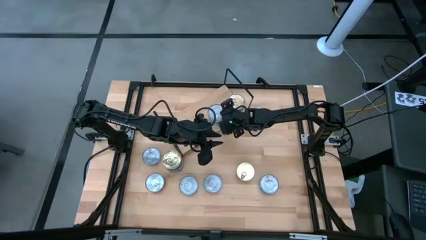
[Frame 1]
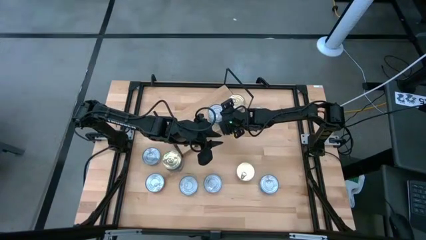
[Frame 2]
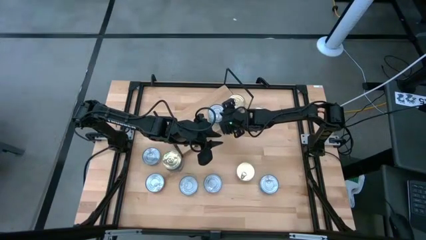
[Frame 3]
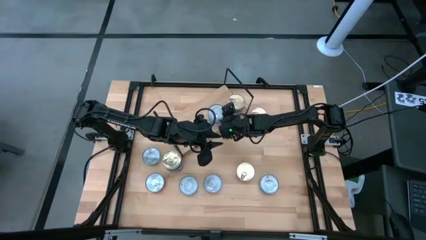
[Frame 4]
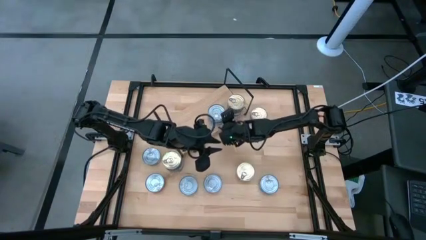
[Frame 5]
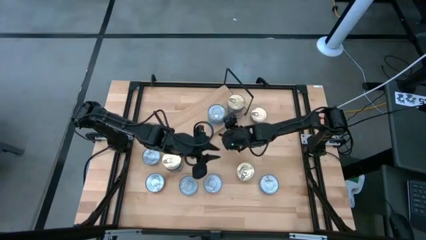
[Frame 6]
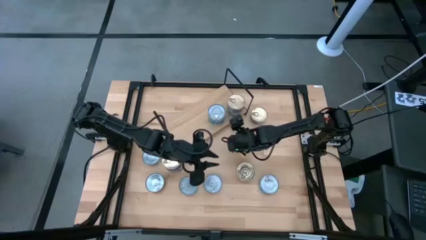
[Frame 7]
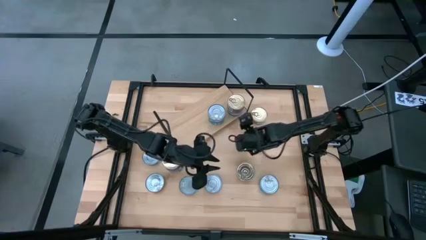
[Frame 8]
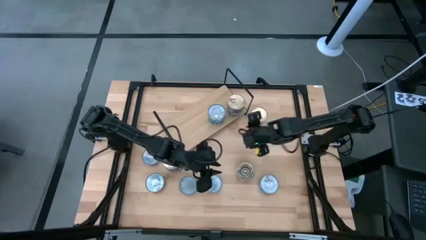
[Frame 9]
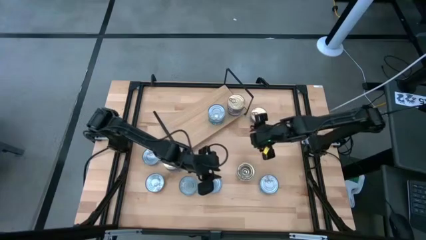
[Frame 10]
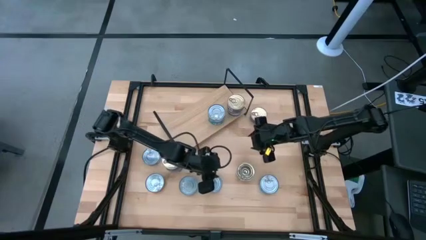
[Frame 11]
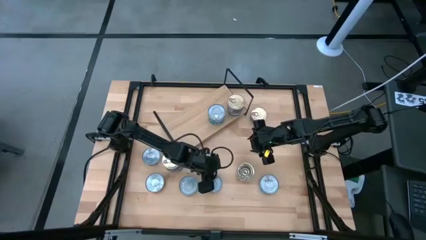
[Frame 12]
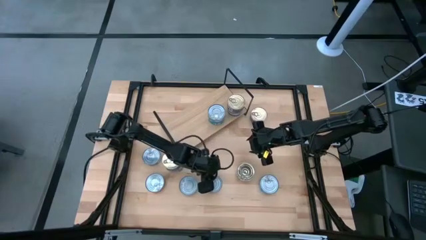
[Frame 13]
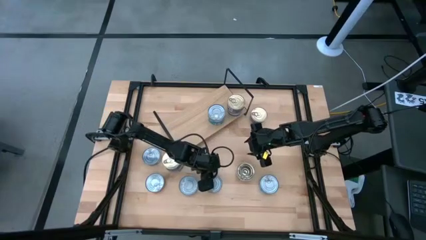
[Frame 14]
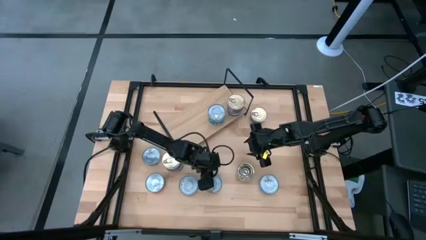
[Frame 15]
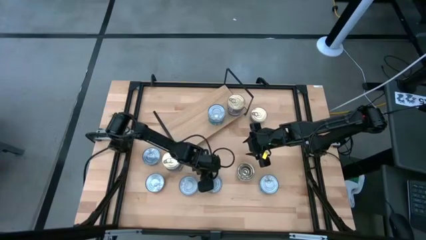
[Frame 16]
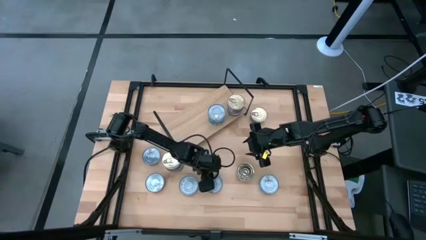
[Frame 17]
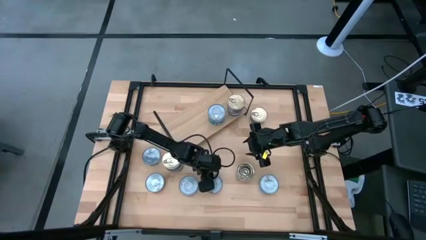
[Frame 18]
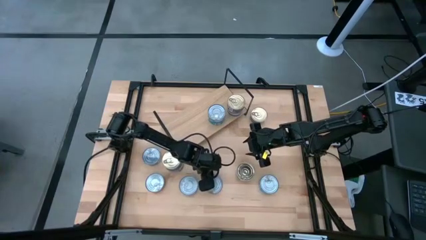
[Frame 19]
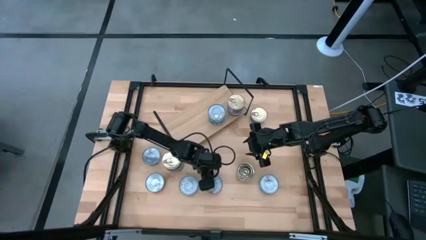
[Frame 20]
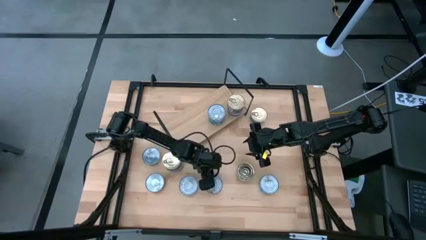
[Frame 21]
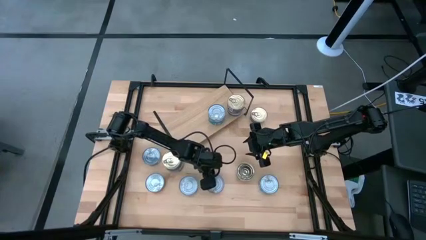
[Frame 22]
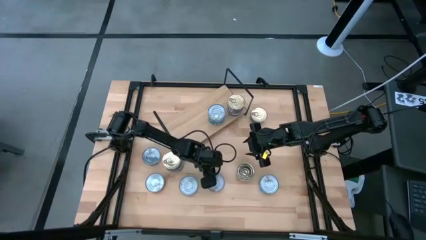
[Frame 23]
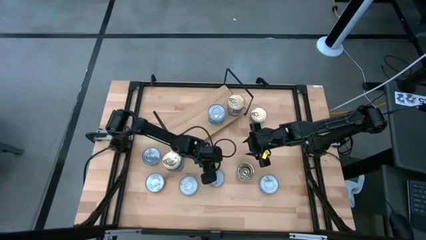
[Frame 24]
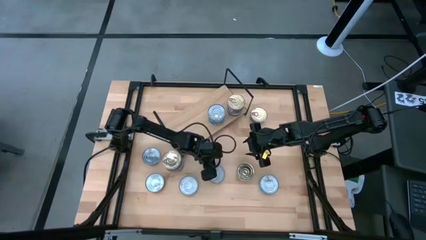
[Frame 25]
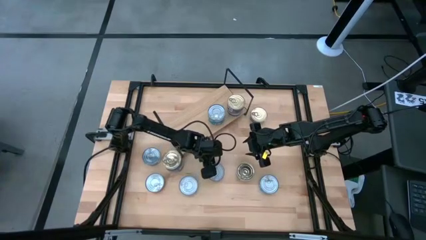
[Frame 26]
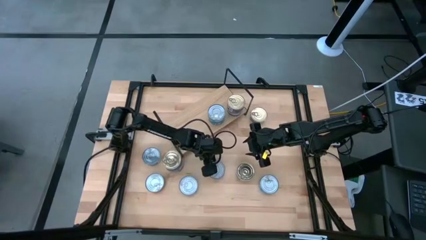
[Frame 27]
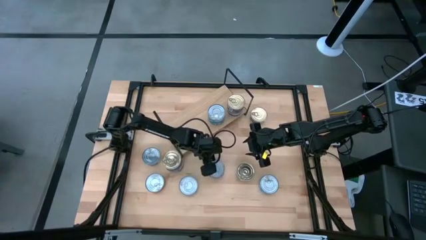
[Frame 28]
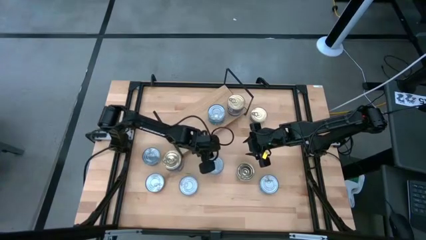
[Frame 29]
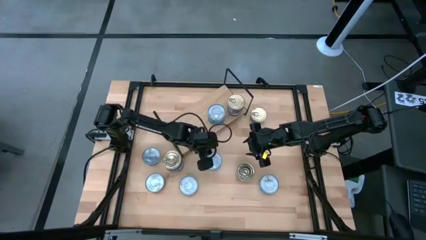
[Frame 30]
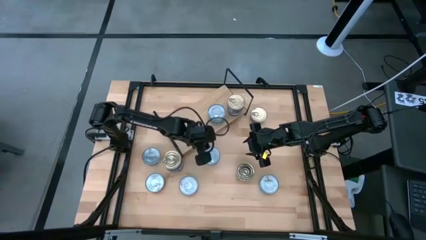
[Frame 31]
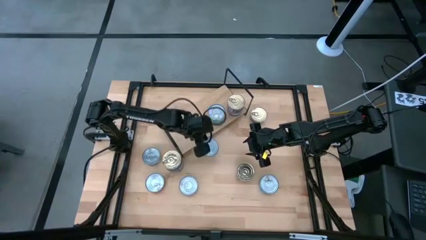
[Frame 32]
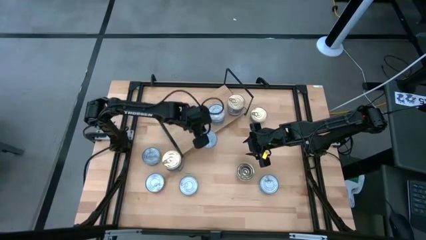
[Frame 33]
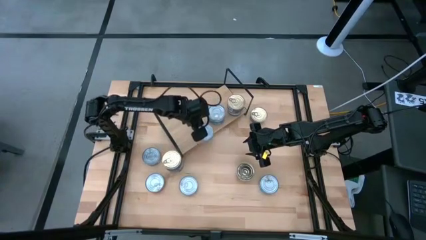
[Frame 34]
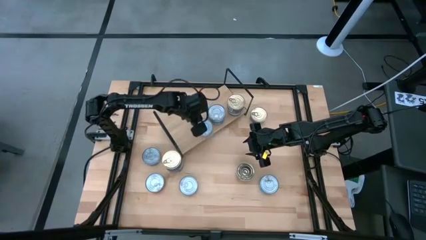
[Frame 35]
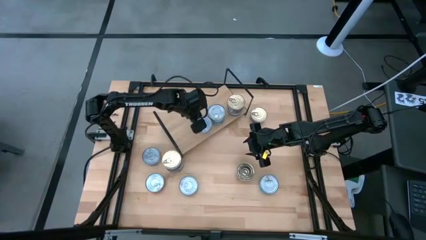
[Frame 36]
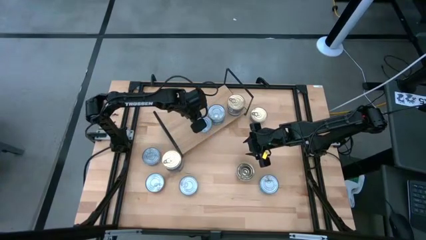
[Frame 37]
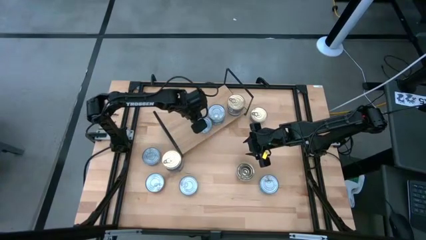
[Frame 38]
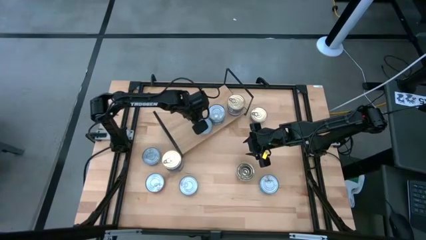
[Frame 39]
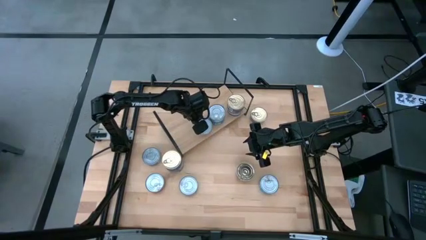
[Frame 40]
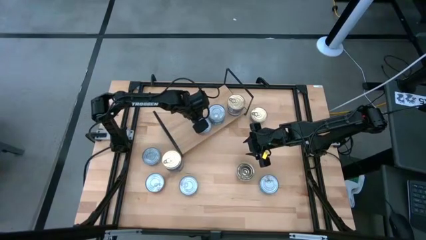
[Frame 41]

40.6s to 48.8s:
Task: Stack canned seafood by type on shelf
Put the red tuna can on the shelf

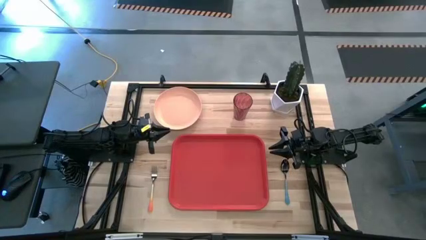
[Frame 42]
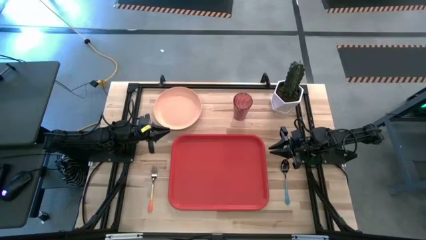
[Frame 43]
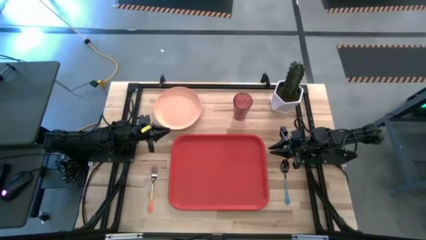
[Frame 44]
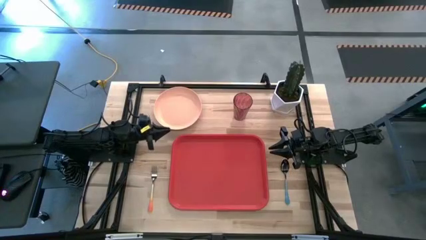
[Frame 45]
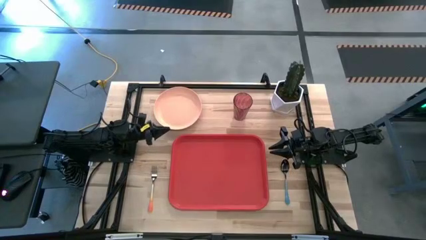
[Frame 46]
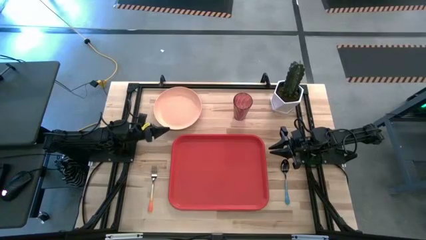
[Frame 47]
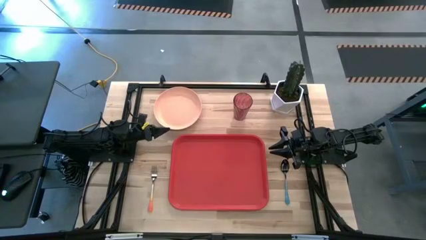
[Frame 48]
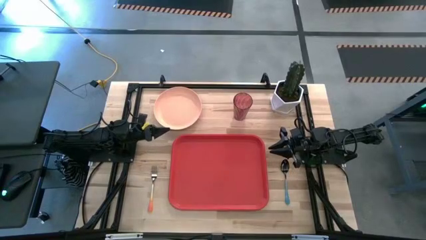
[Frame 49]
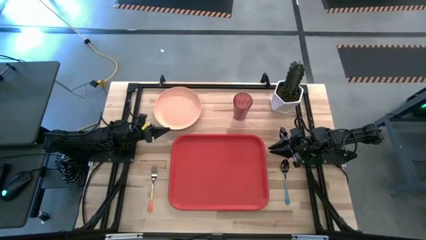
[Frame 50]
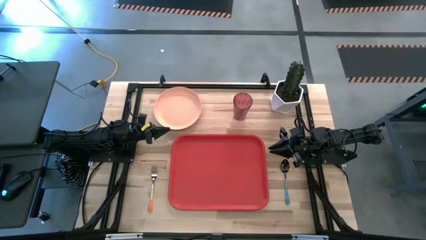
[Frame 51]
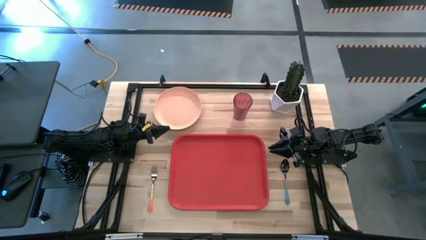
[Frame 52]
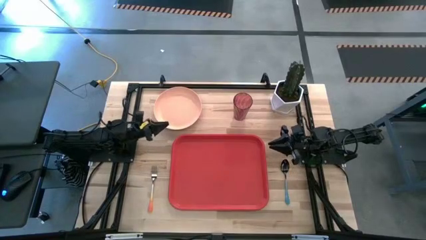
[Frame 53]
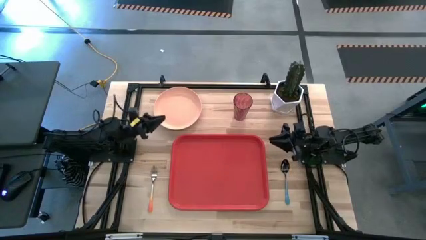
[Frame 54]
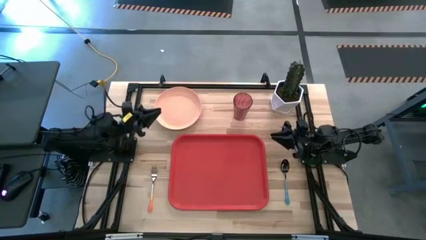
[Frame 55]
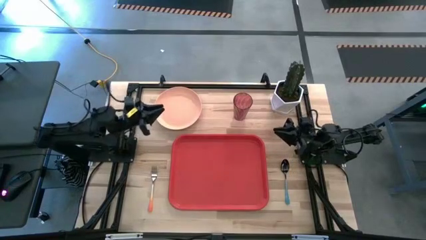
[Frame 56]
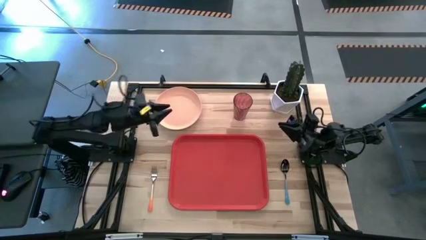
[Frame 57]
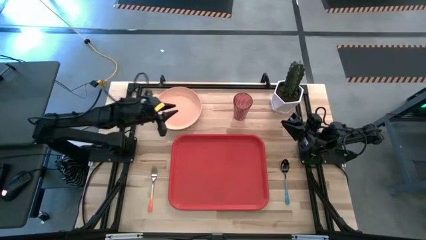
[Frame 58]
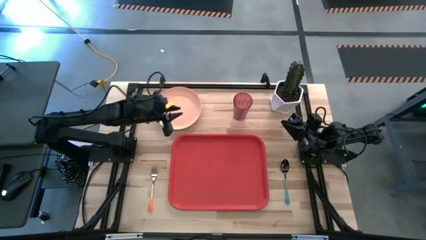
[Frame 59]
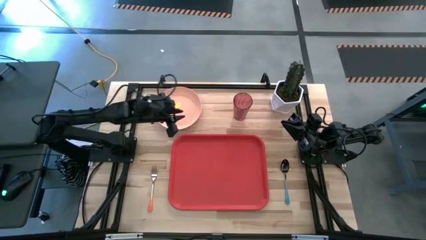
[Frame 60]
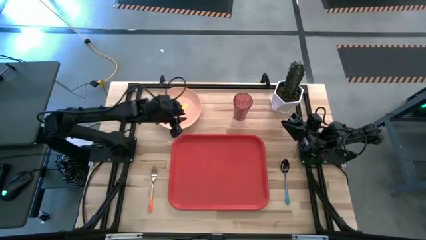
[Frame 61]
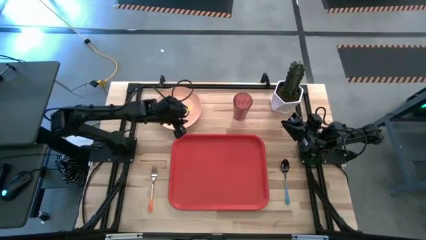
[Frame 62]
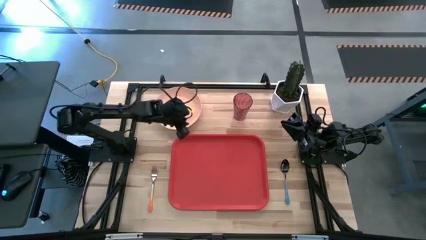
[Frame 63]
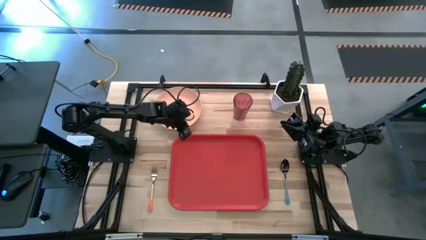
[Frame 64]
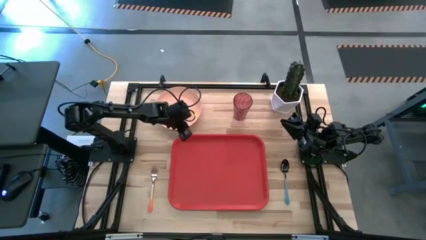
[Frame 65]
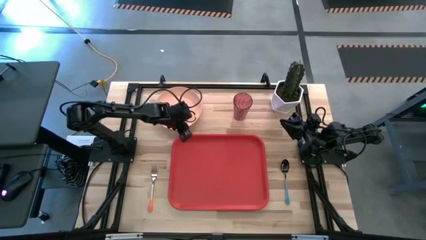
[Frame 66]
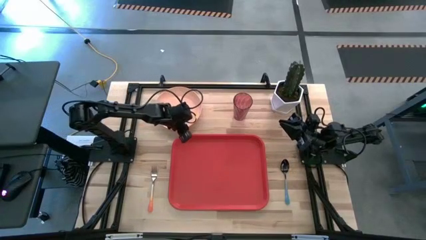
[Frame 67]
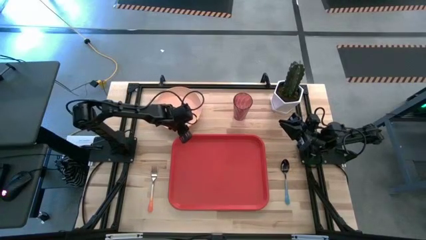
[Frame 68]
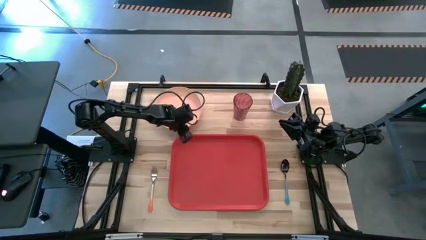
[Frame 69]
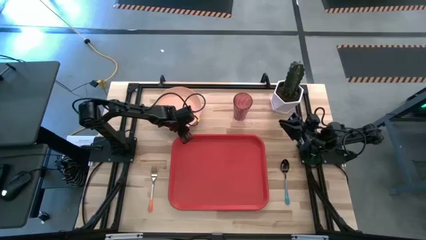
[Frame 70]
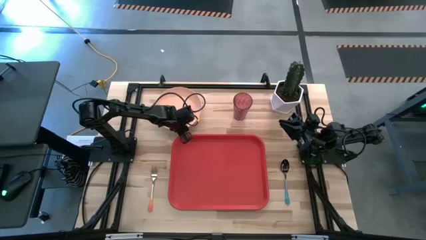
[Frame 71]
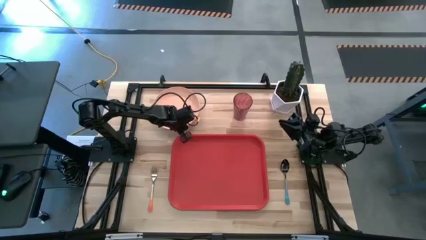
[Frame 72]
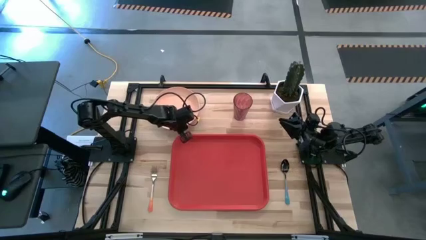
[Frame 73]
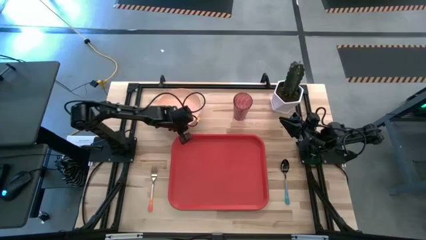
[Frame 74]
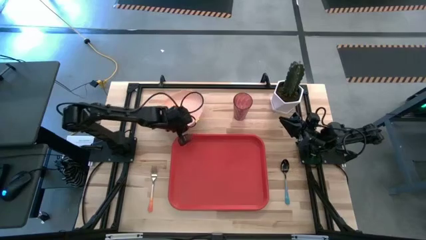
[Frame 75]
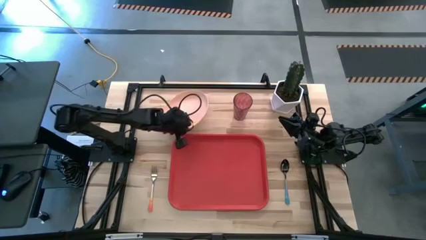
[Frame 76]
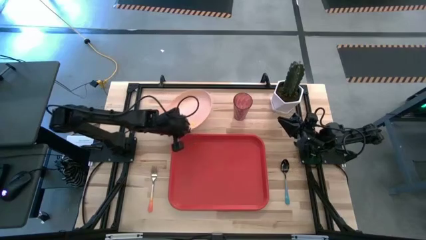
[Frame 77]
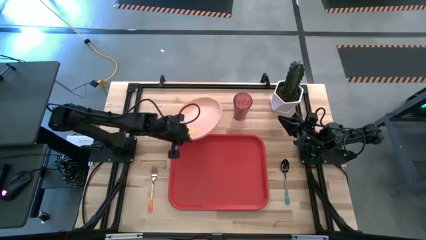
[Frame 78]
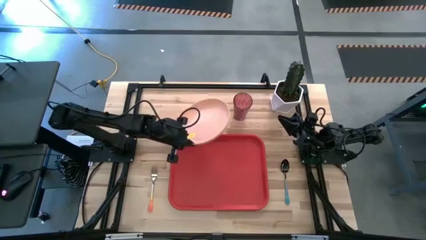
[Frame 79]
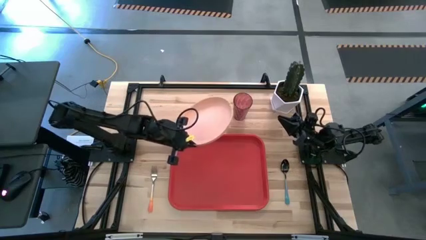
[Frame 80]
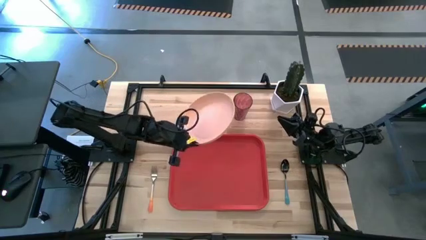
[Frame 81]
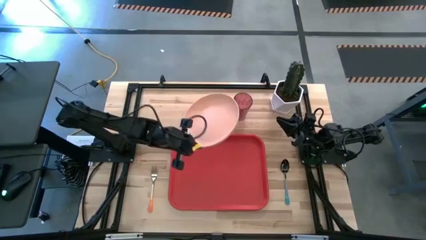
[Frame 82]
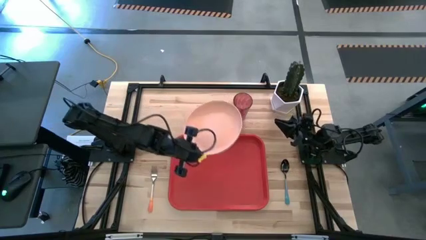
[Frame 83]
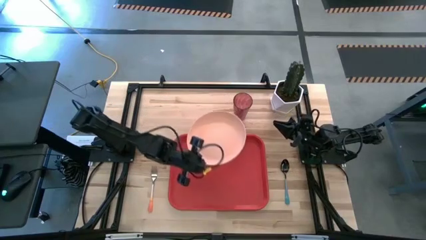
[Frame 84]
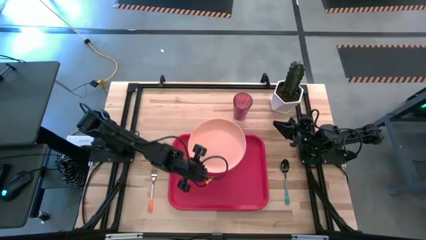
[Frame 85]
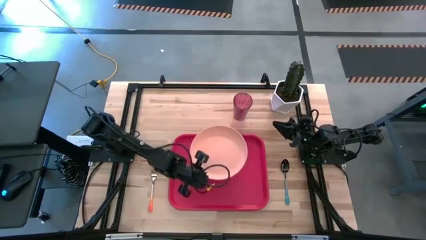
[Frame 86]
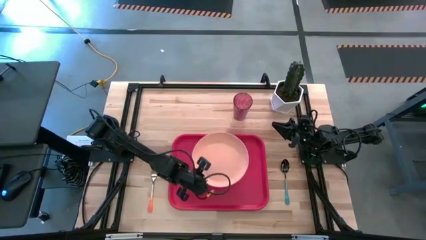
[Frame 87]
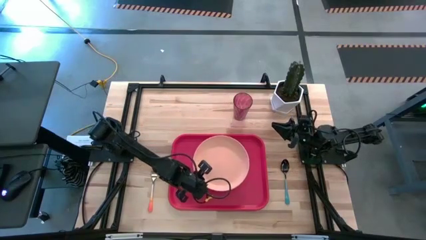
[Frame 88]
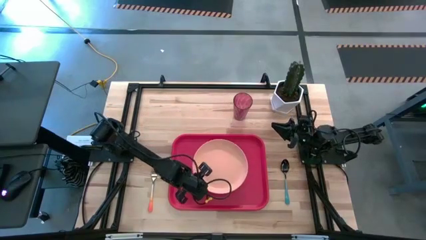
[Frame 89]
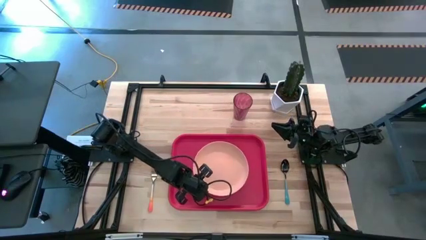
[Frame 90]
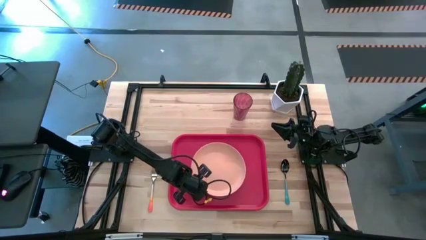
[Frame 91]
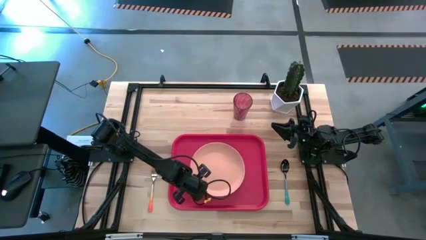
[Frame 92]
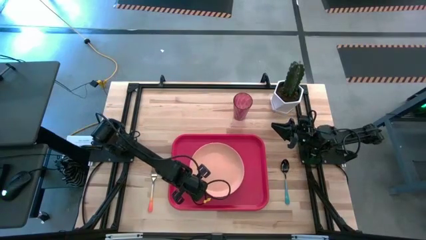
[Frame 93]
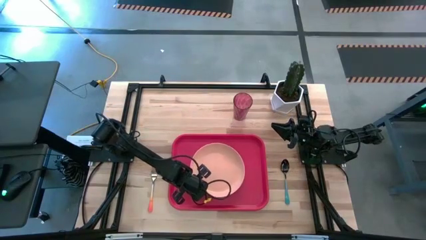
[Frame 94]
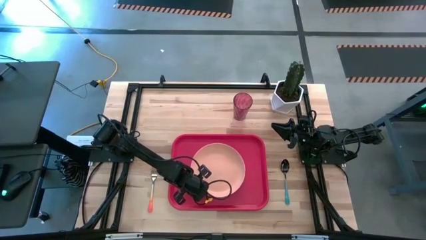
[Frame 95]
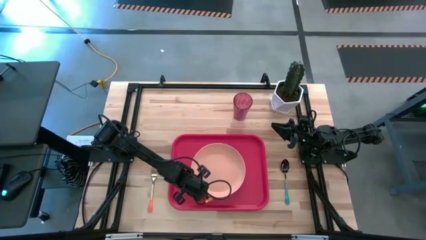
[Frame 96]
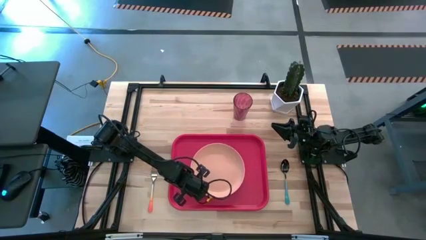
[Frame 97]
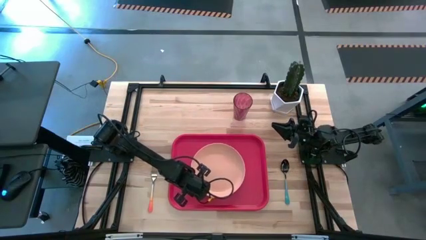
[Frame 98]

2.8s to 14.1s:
Task: Pick and place plate/cup/fork/spoon on tray
Put the light pink plate on the red tray
